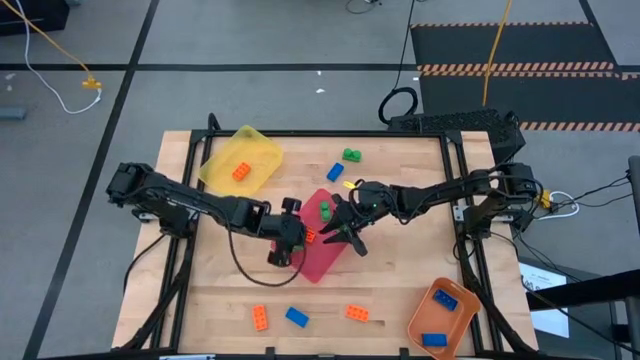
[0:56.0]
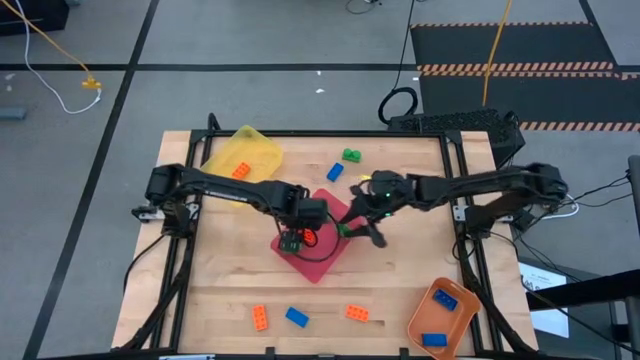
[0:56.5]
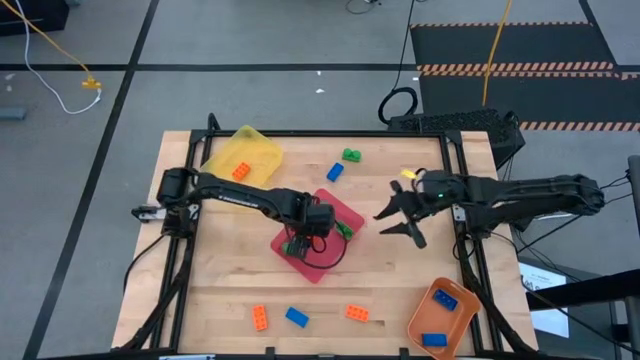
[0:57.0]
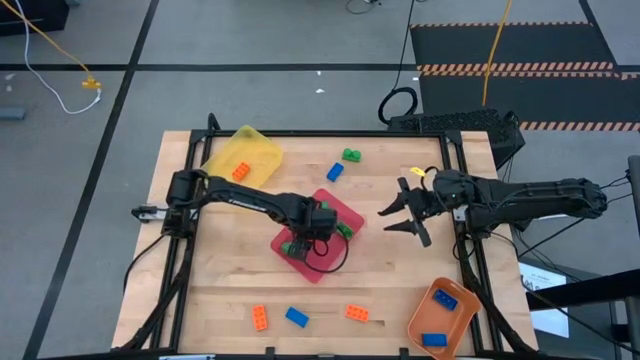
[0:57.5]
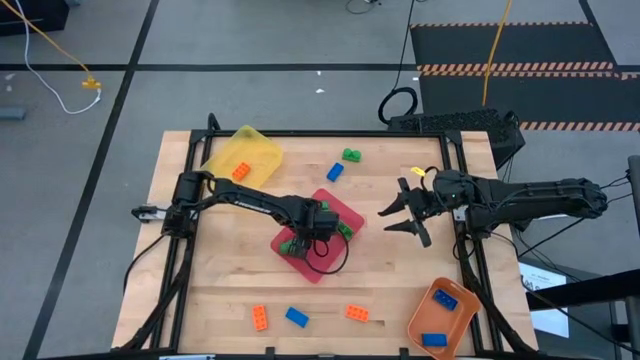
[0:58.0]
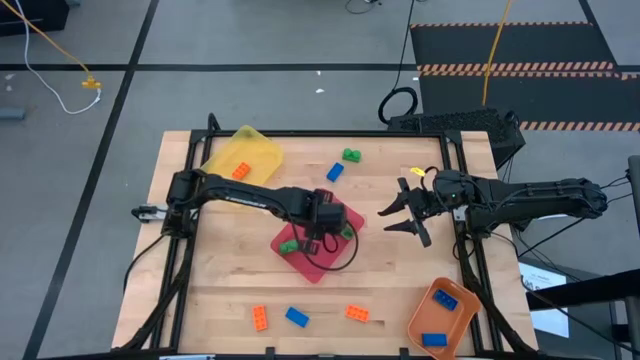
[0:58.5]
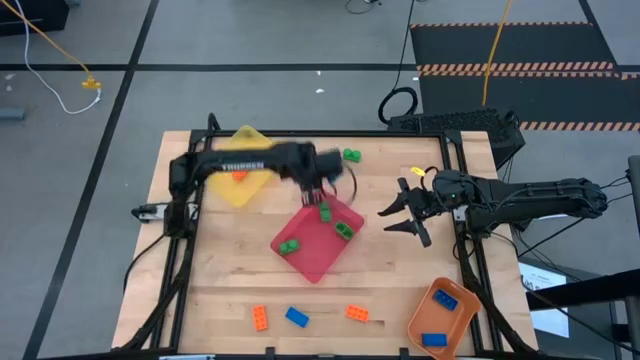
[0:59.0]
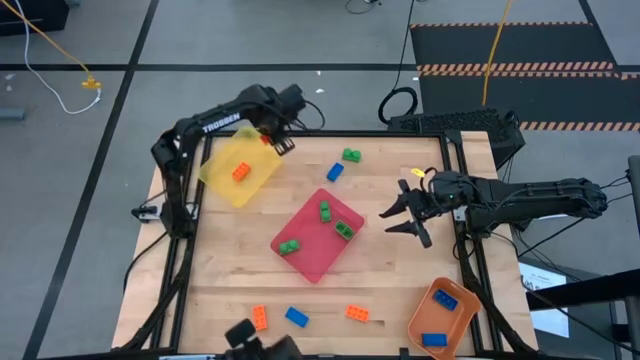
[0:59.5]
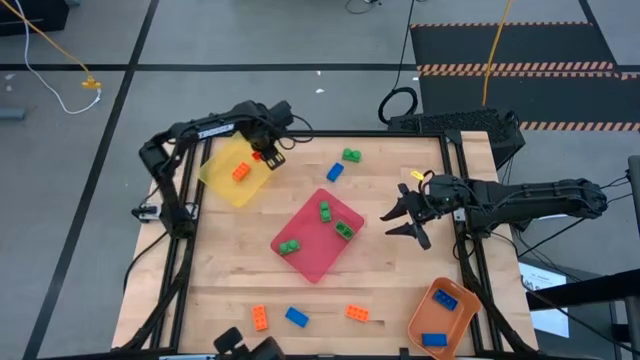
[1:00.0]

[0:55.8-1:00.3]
Task: Sort & place blocks by color
Put the orange game piece into the yellow bin

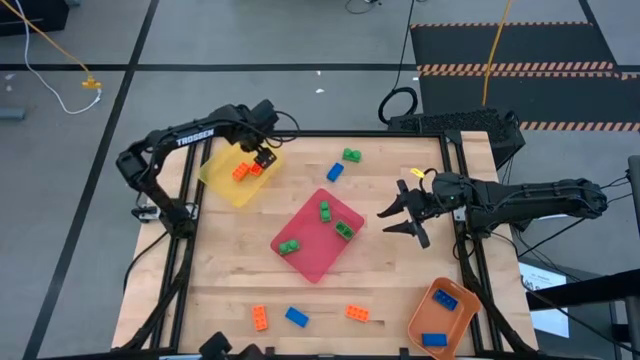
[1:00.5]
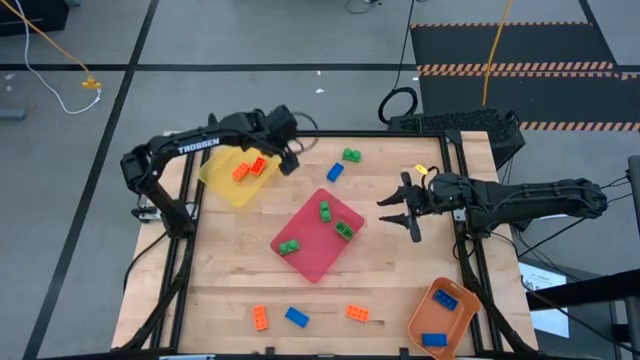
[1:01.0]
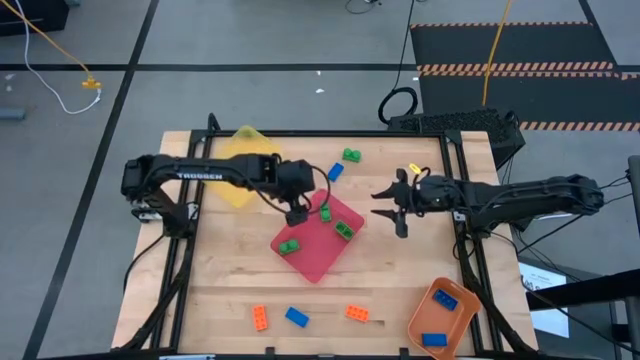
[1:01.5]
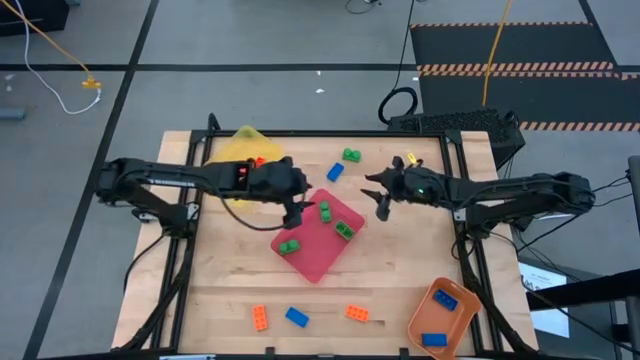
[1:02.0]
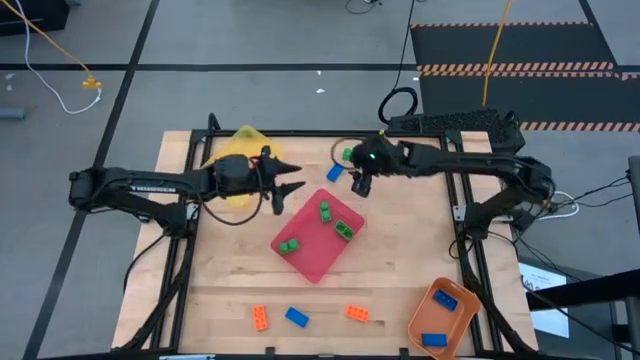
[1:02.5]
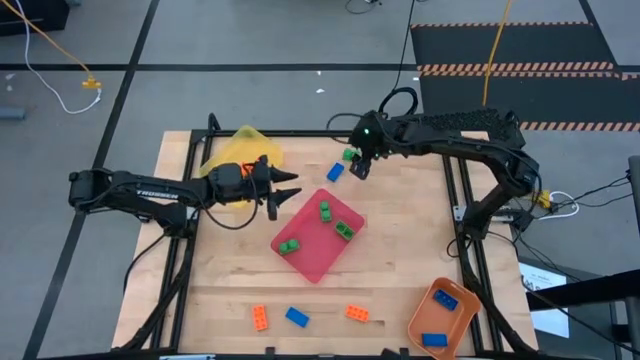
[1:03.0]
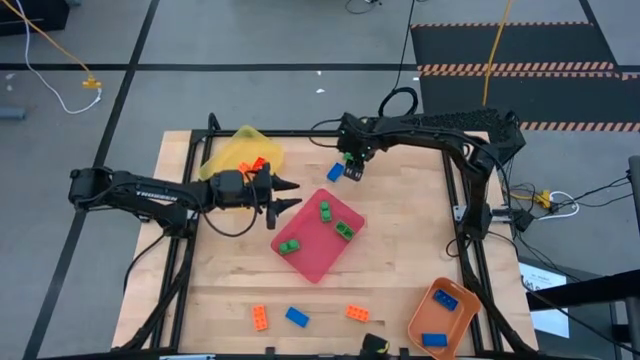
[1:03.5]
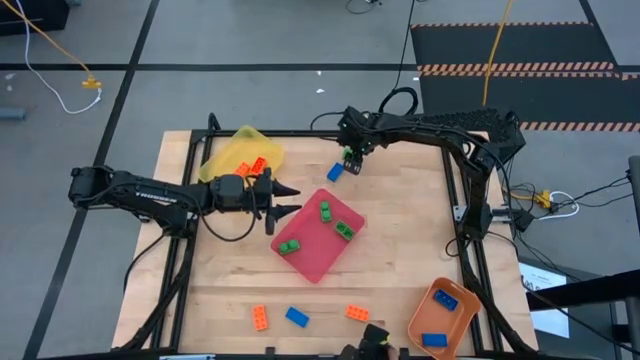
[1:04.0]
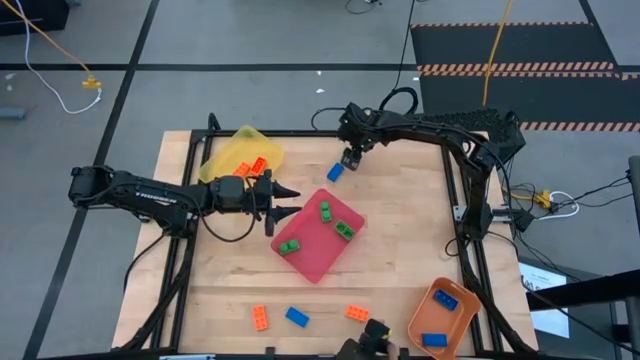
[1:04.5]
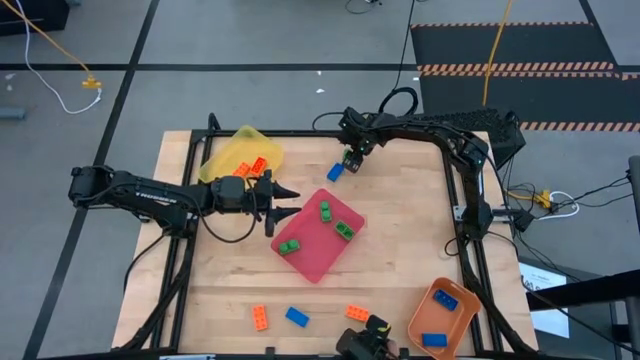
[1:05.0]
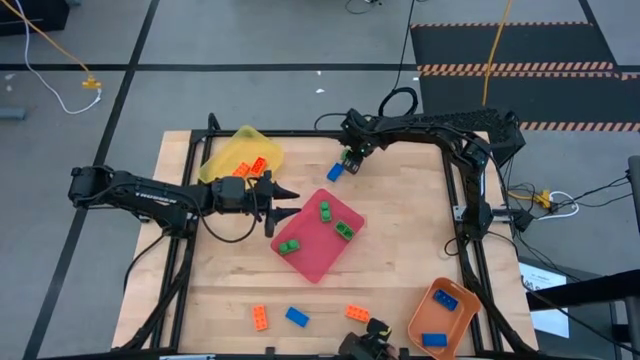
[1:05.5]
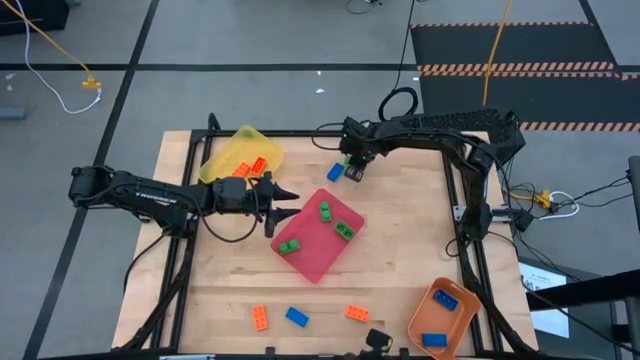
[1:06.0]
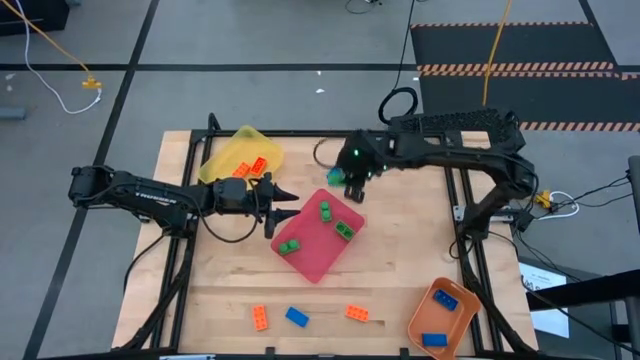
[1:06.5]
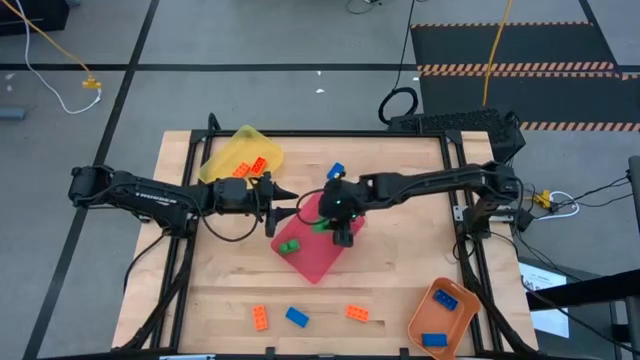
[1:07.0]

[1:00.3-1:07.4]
Put the green game piece into the red bin

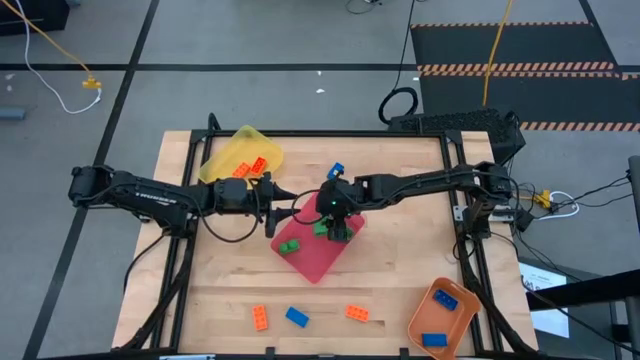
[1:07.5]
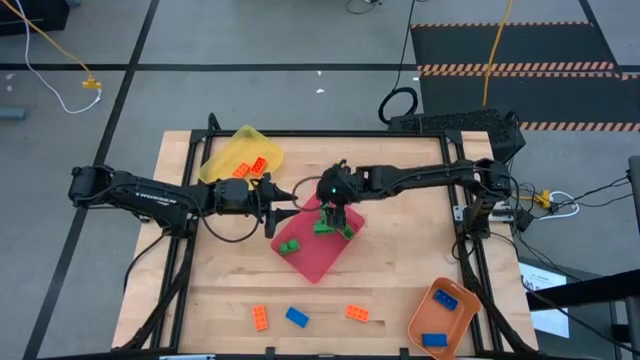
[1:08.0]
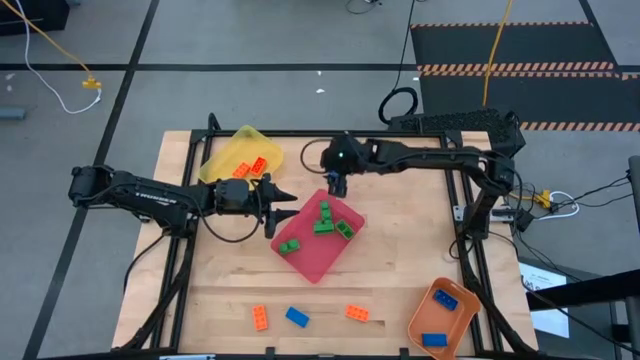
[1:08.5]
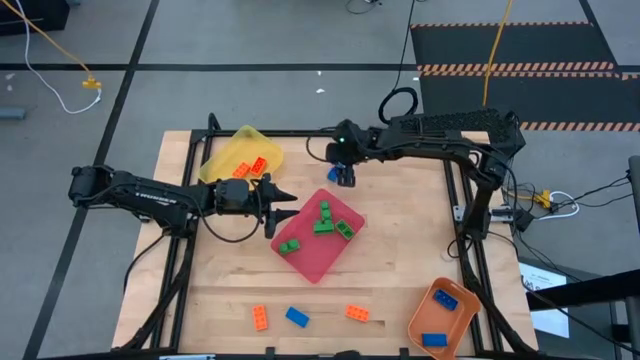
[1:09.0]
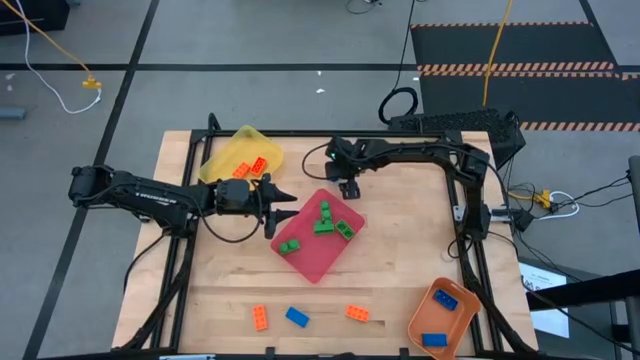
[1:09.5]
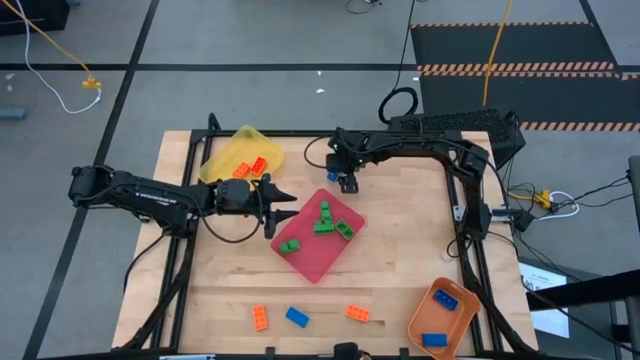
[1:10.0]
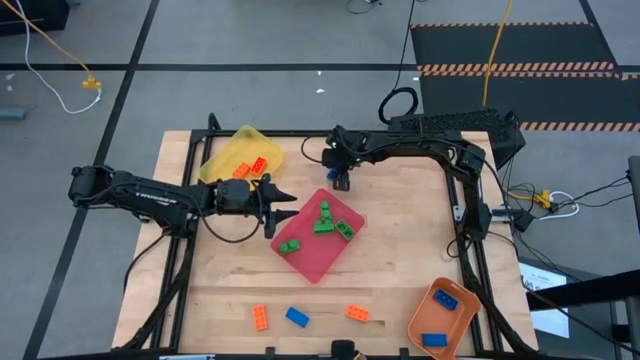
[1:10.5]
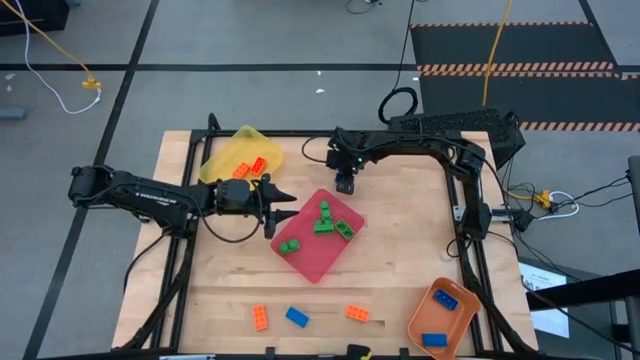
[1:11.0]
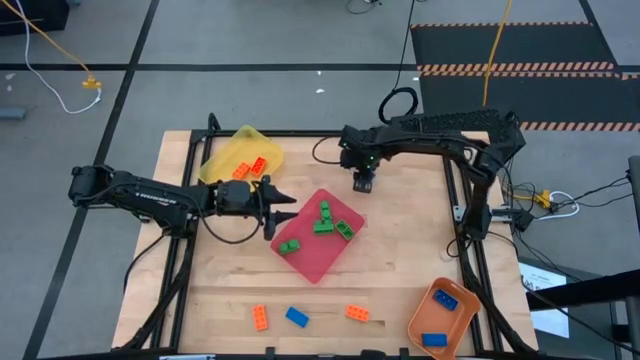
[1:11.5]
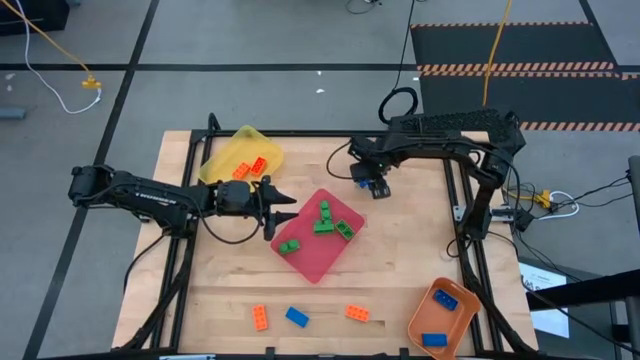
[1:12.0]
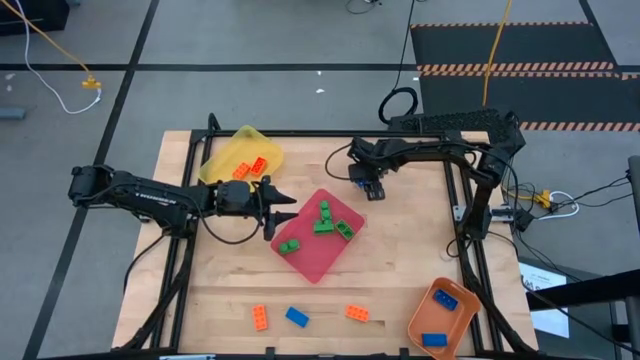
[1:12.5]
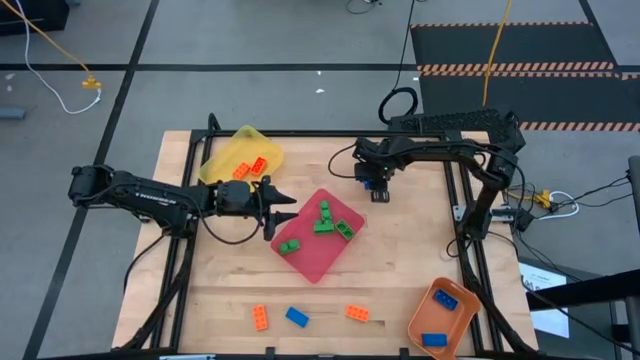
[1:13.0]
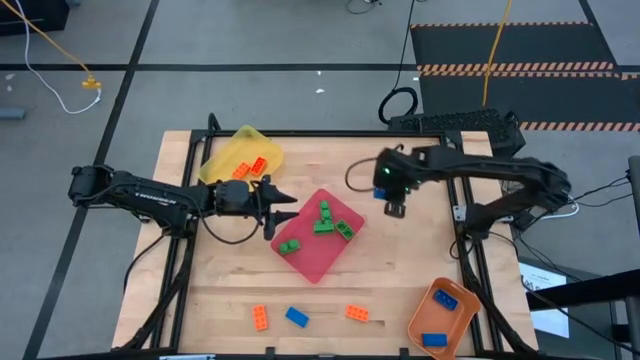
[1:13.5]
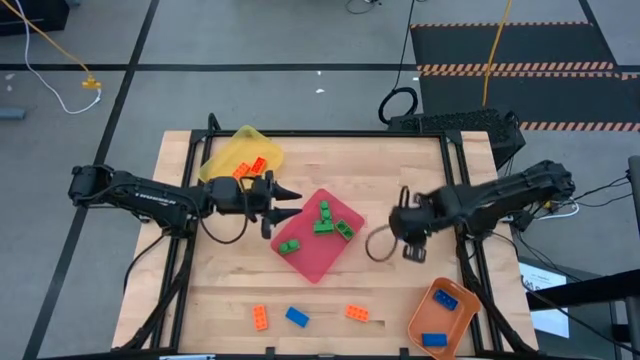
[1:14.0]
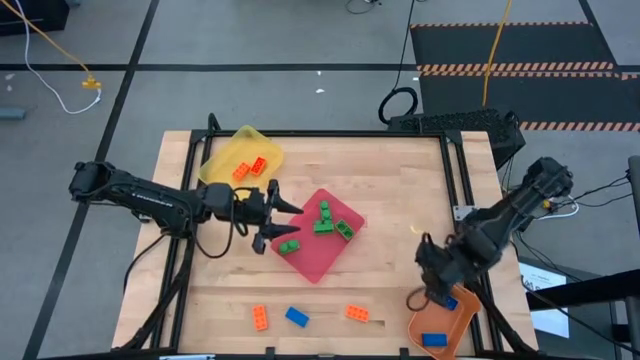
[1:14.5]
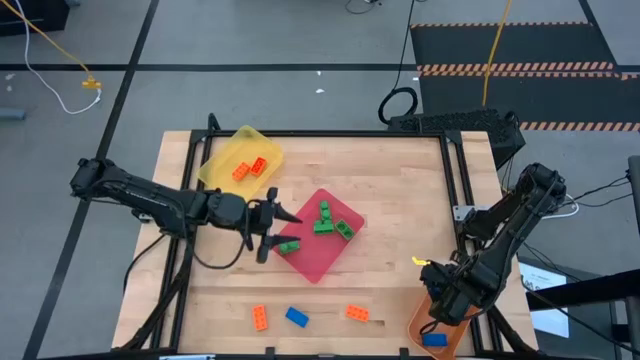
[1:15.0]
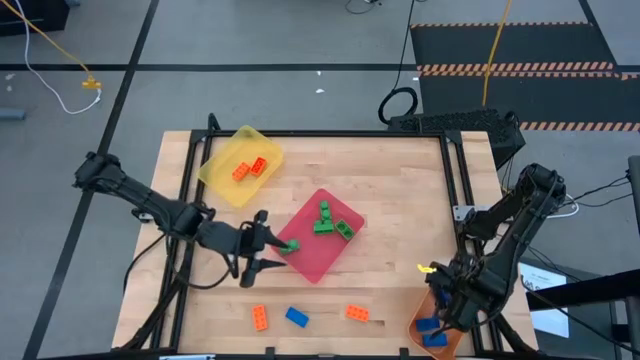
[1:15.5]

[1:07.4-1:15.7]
Put the blue game piece into the orange bin

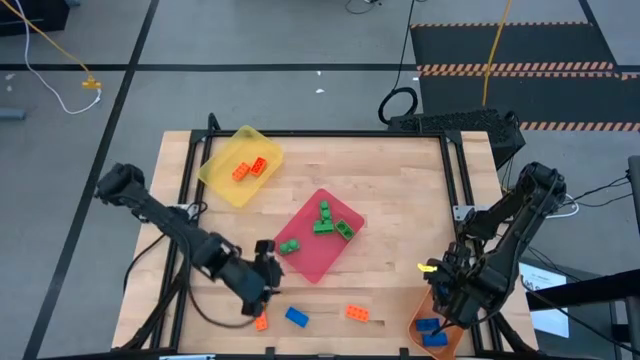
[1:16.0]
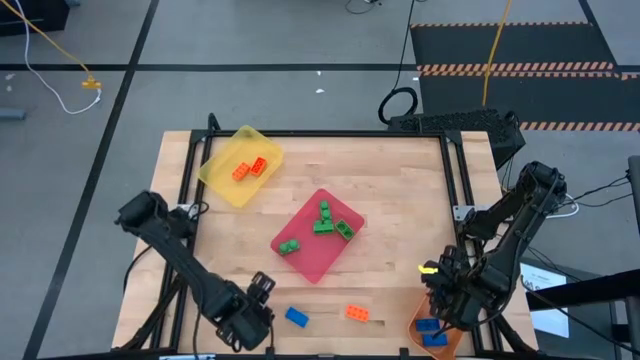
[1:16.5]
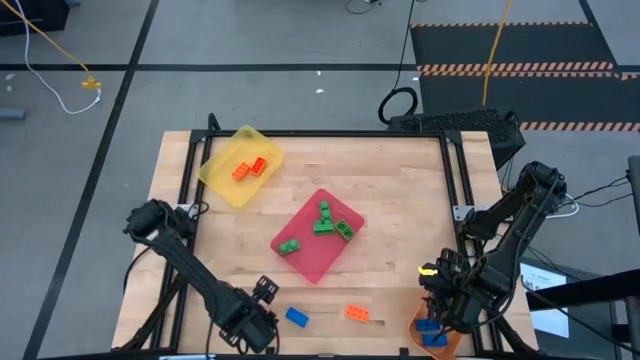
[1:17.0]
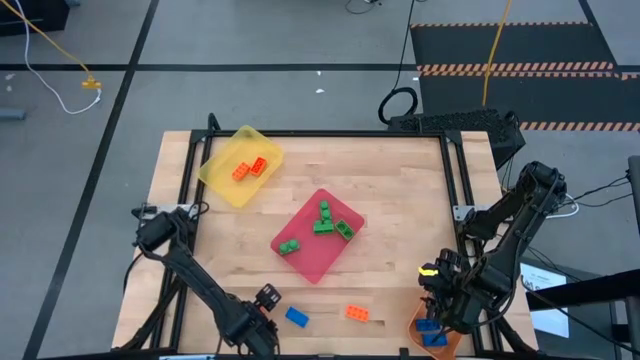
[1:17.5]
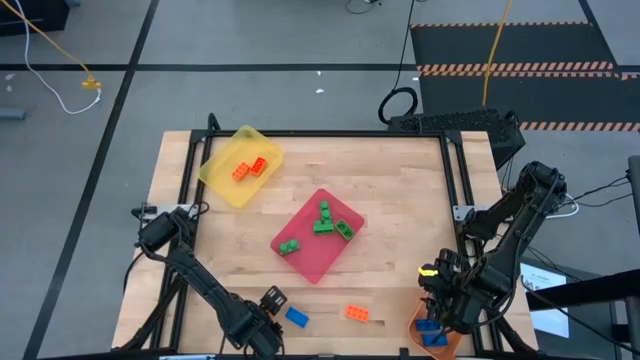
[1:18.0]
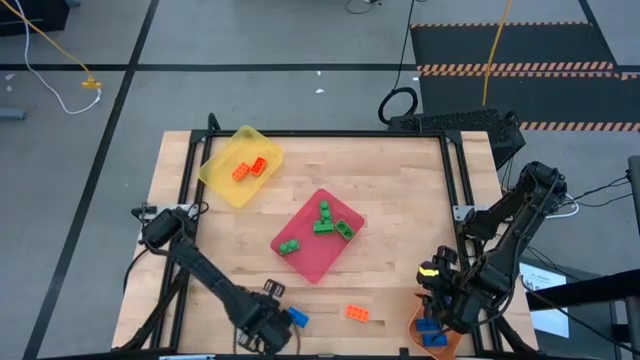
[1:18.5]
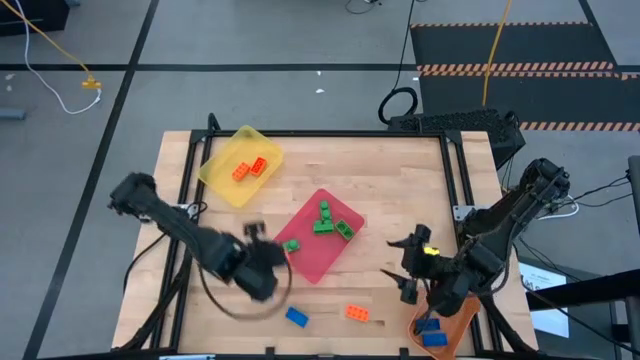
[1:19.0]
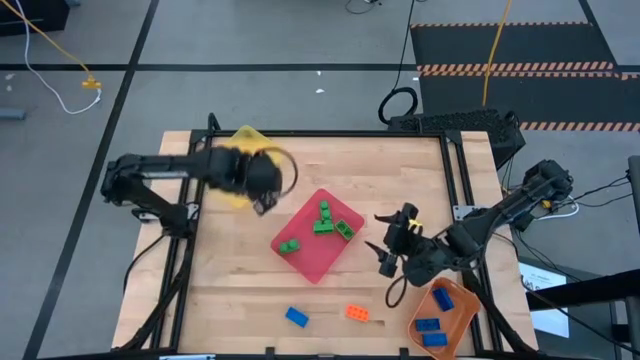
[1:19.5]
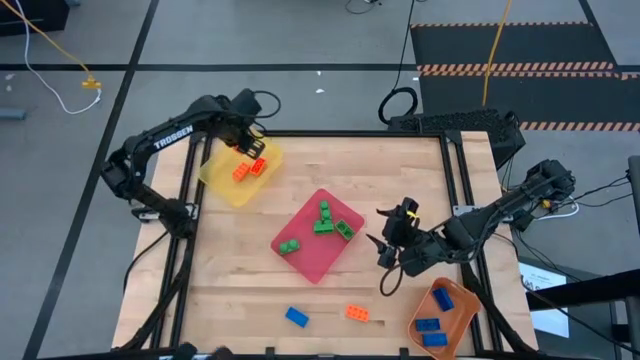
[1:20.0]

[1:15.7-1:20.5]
Put the orange game piece into the yellow bin
